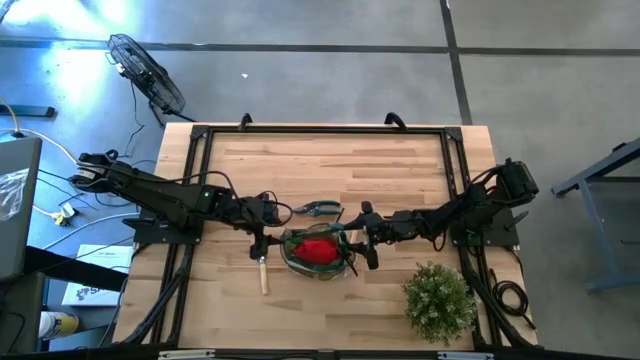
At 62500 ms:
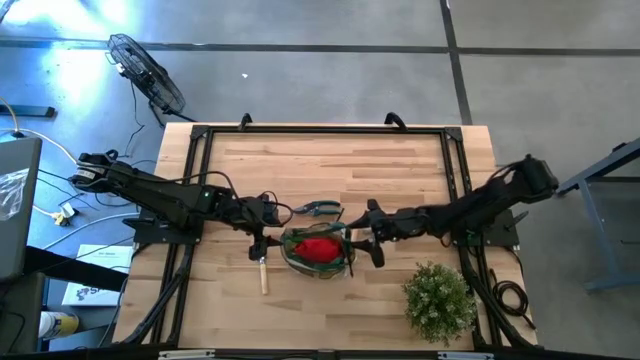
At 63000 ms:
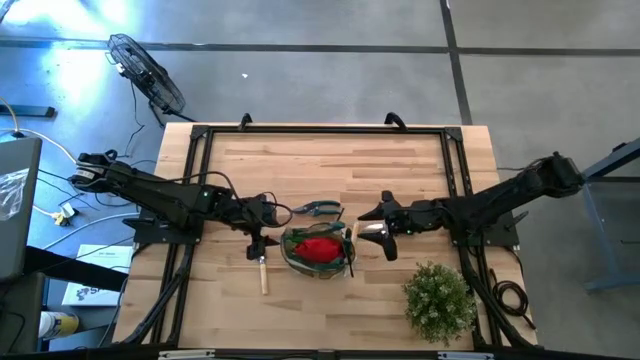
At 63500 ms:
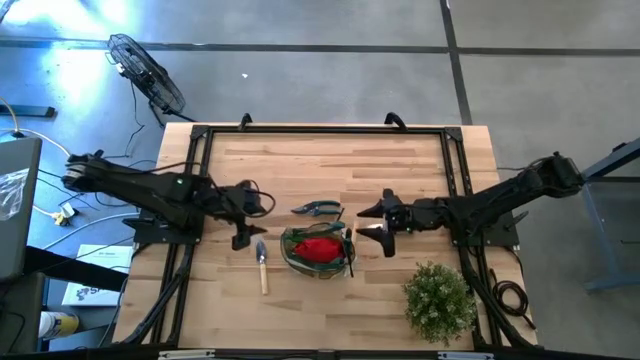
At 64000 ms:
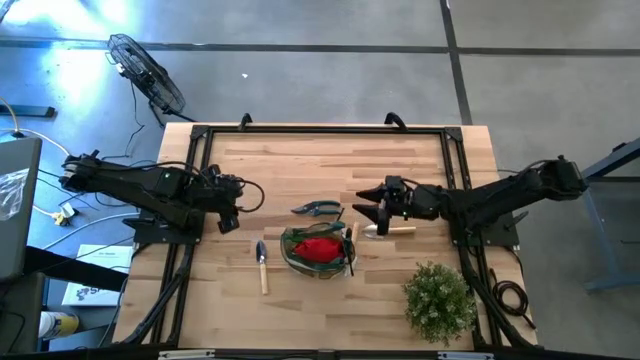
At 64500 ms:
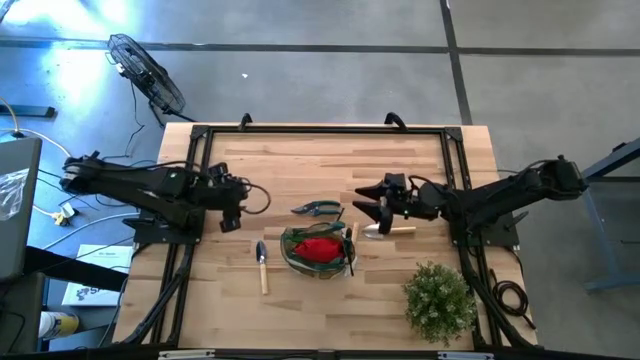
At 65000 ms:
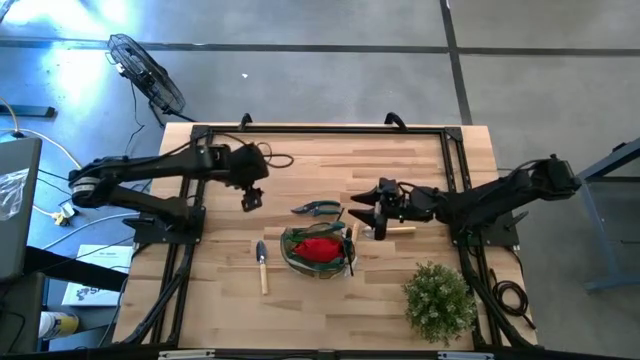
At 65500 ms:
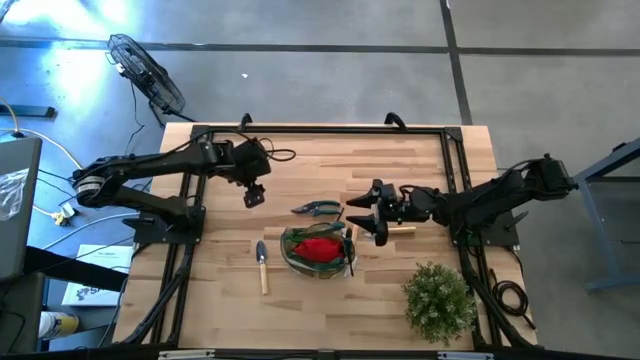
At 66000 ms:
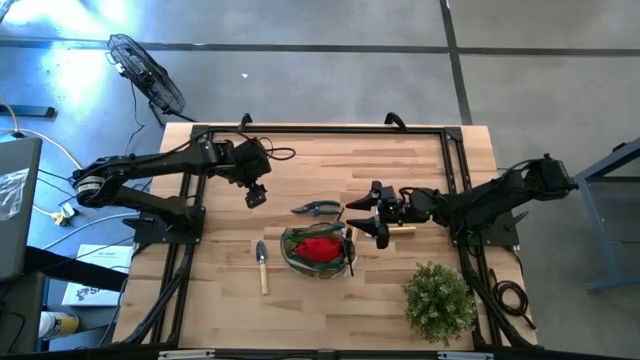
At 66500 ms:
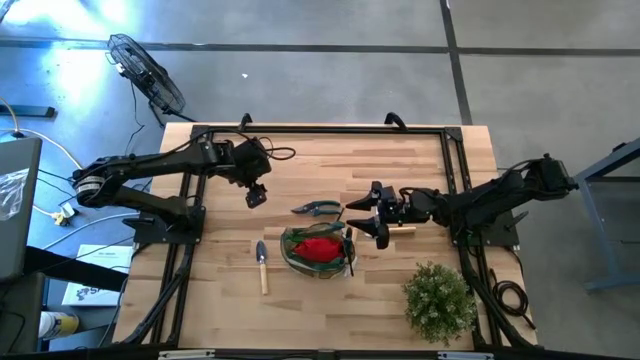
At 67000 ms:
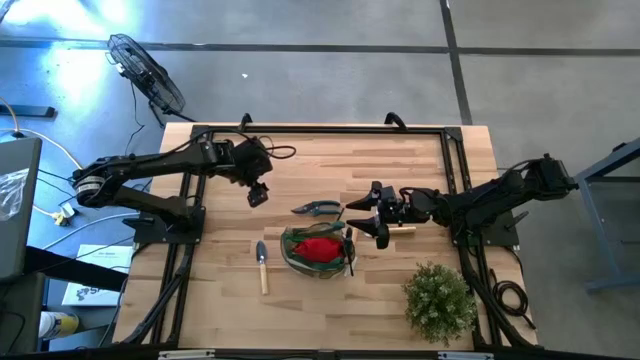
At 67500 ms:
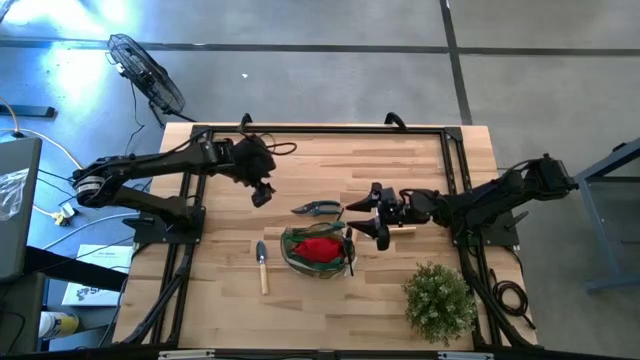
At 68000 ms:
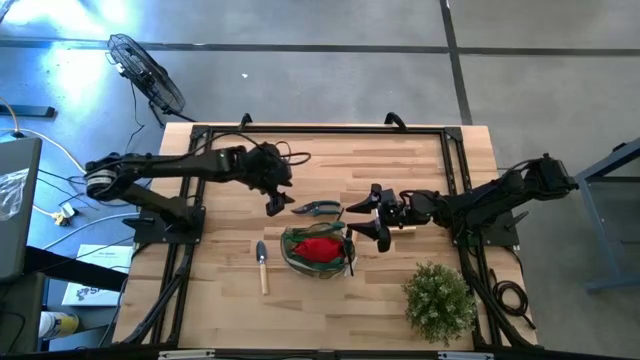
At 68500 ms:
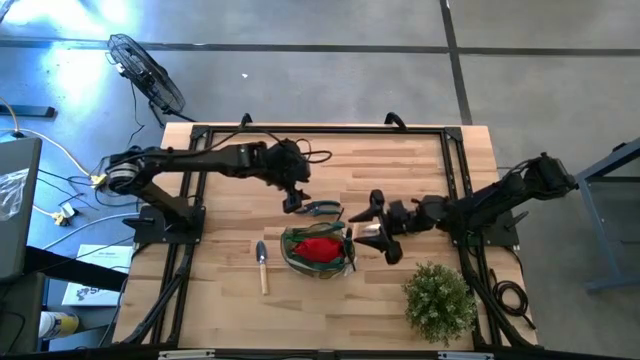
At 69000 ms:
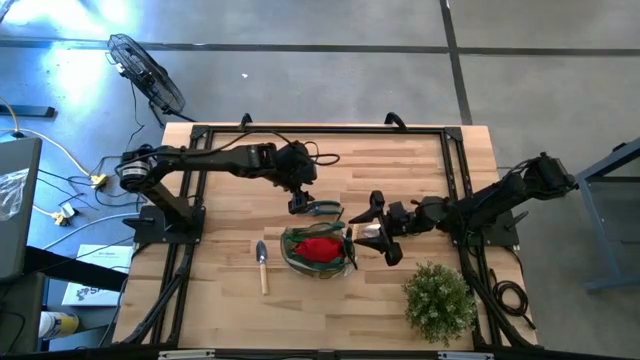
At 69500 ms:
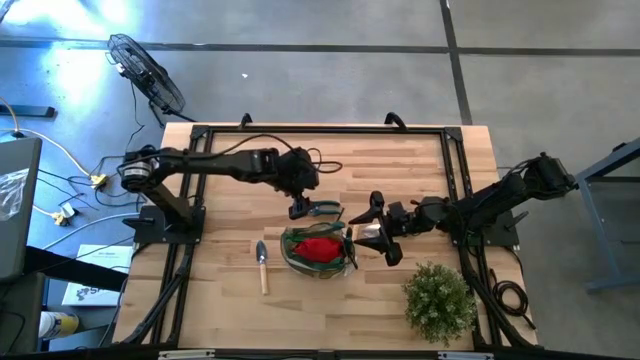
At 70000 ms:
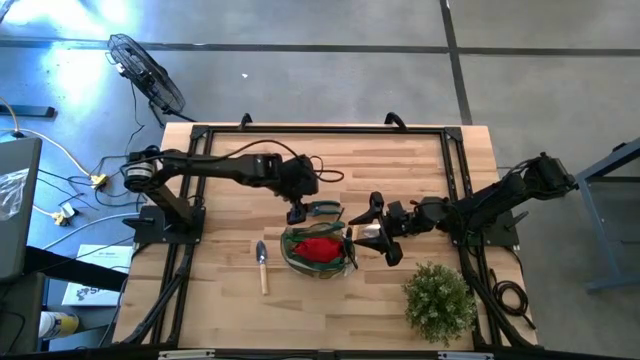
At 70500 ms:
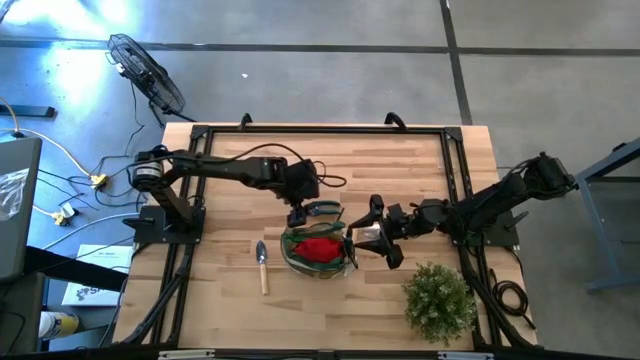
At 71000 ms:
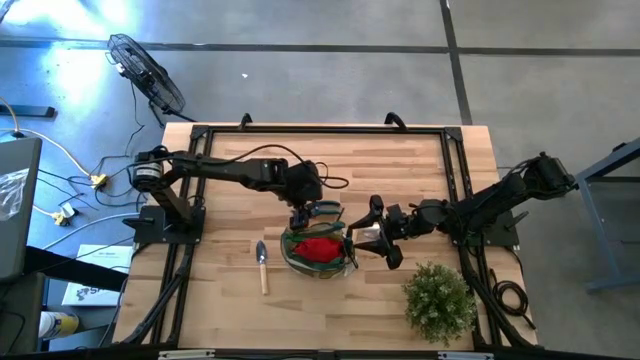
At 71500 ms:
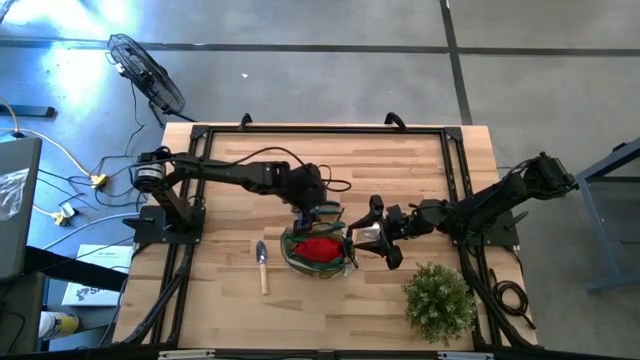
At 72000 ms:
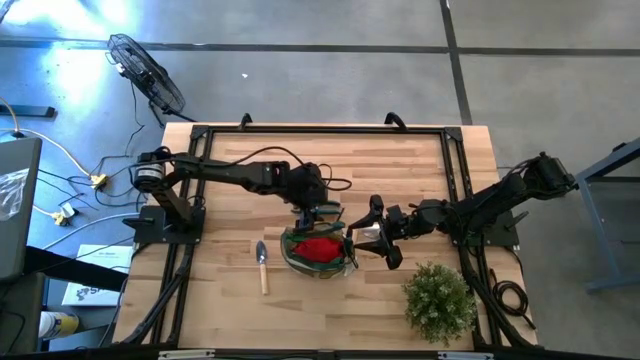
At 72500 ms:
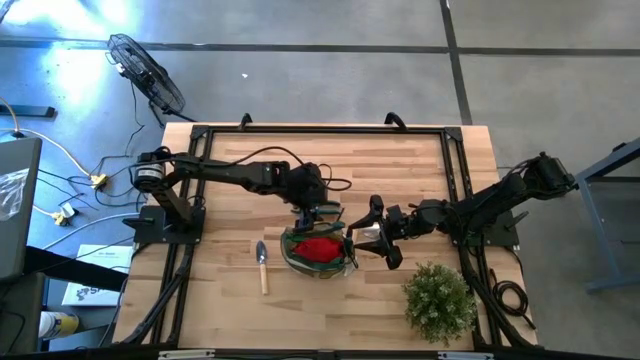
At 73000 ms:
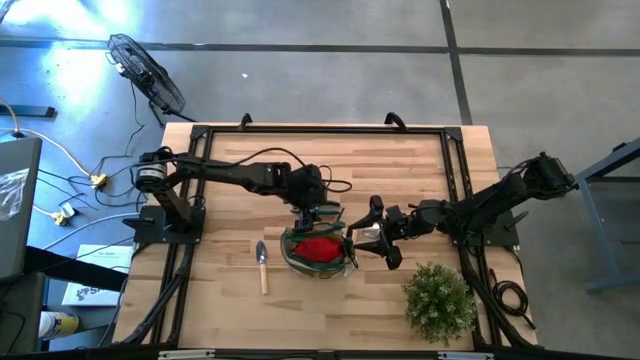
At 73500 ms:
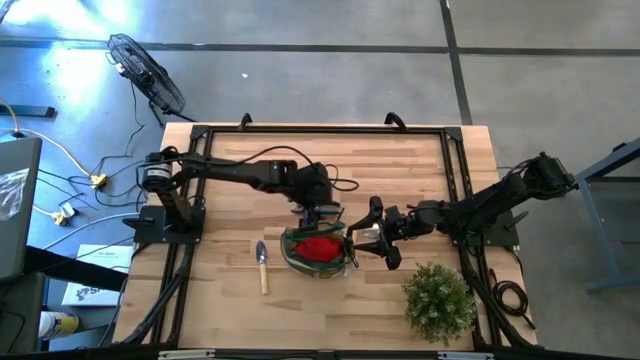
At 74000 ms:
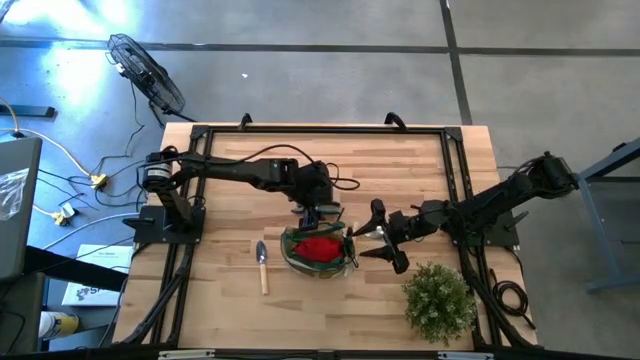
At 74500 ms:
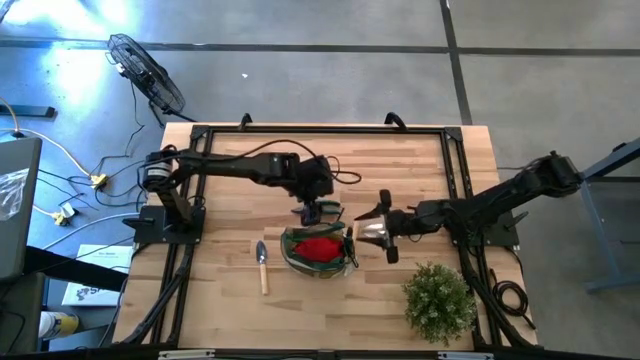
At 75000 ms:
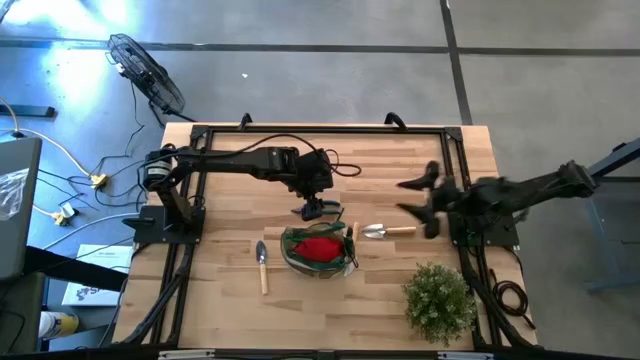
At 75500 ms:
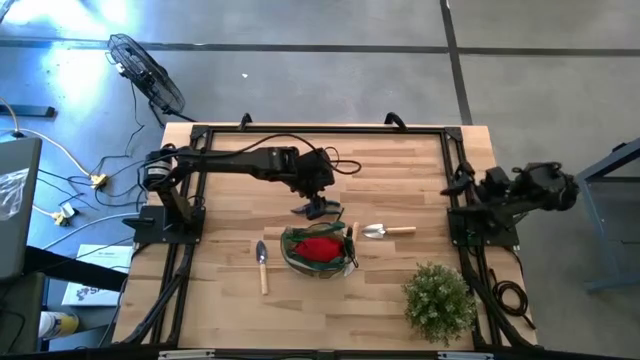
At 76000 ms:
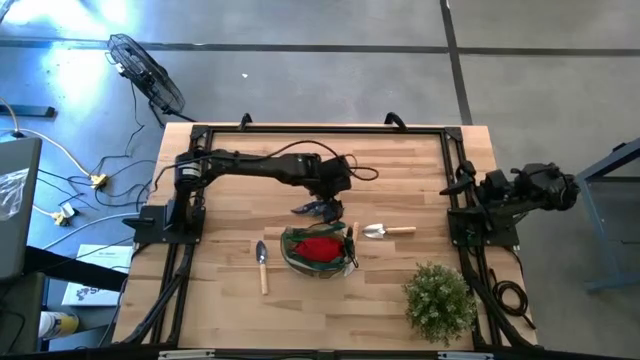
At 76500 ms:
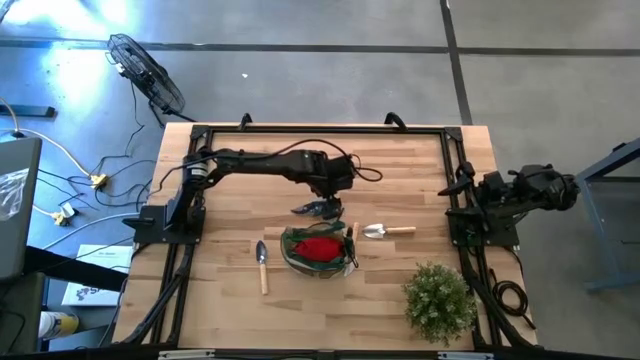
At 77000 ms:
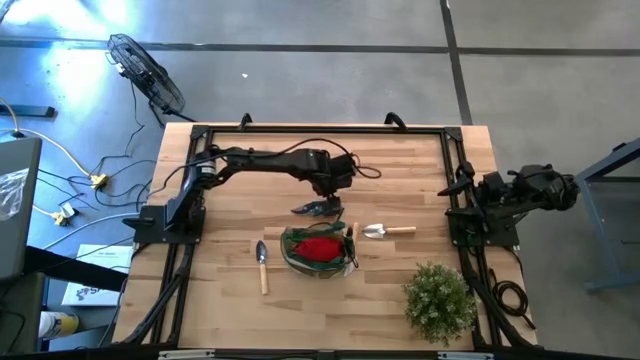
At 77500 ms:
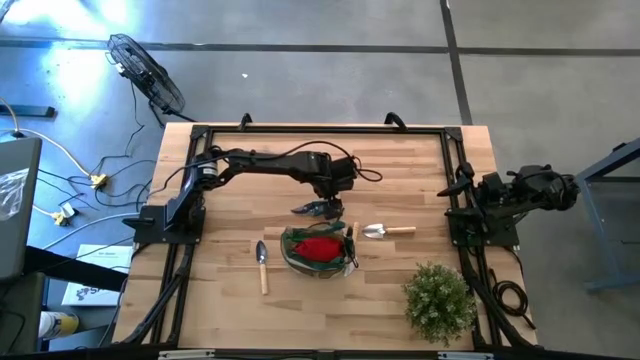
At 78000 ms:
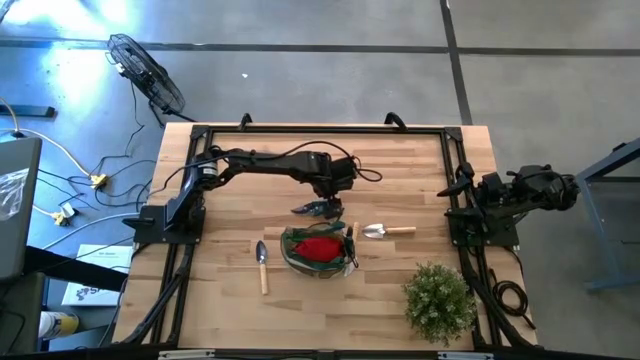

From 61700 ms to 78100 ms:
Task: Pick & Place Garden tools in Gardening bag
Put the green shear scissors into the green gardening bag

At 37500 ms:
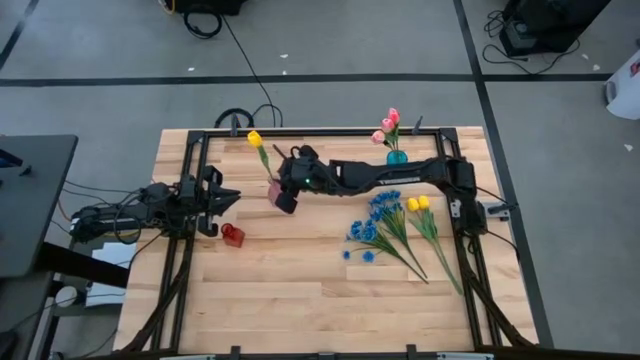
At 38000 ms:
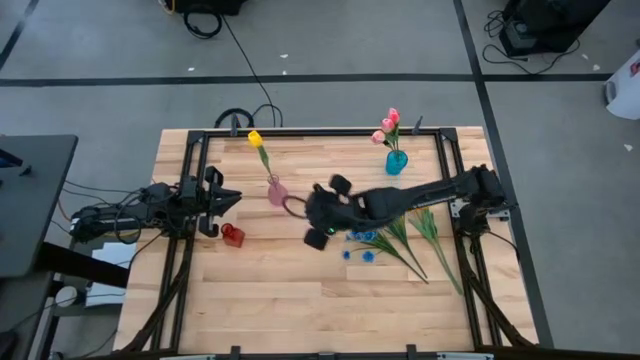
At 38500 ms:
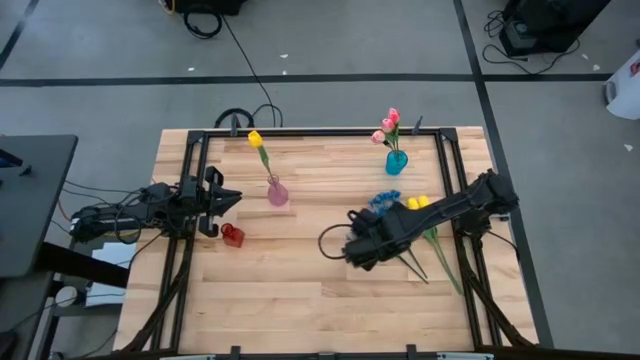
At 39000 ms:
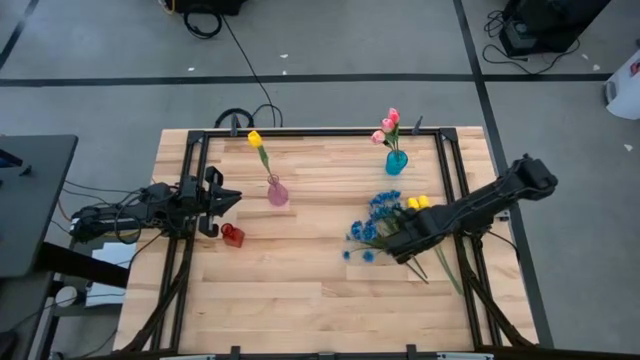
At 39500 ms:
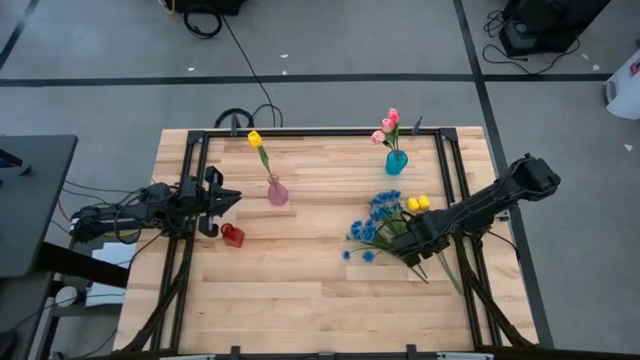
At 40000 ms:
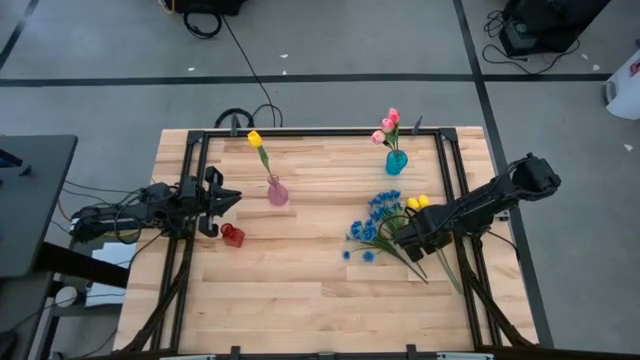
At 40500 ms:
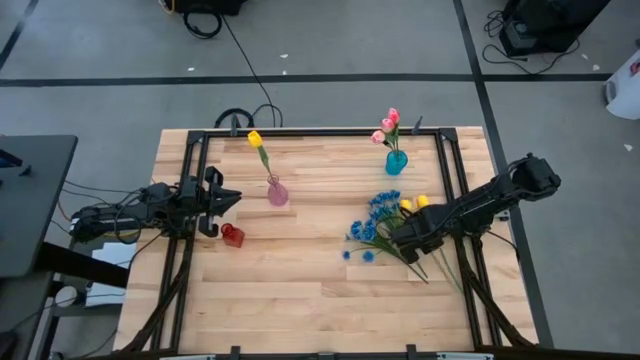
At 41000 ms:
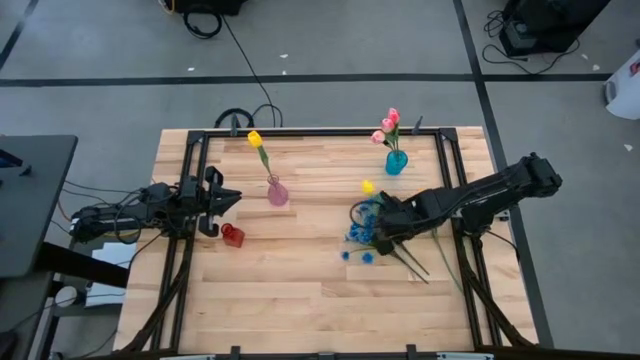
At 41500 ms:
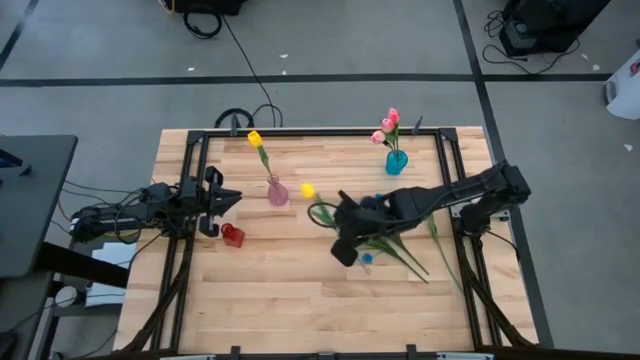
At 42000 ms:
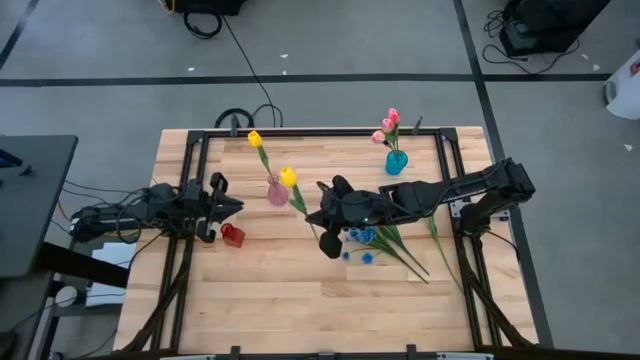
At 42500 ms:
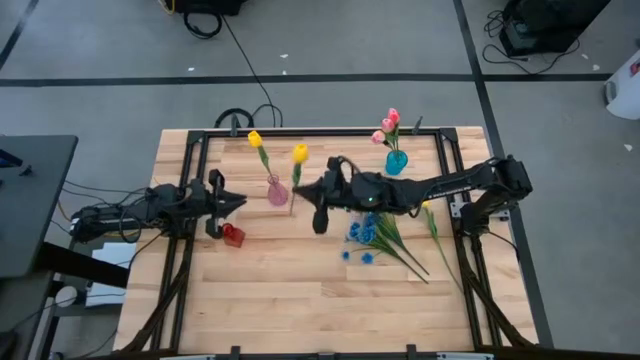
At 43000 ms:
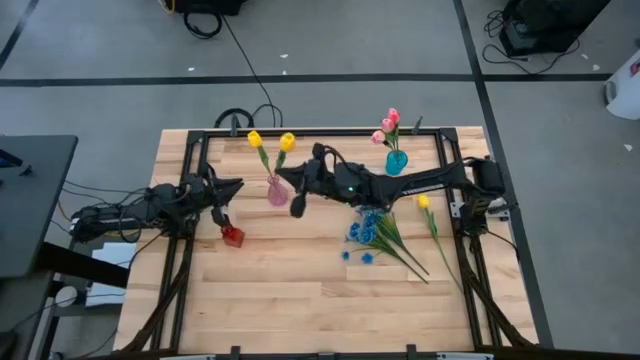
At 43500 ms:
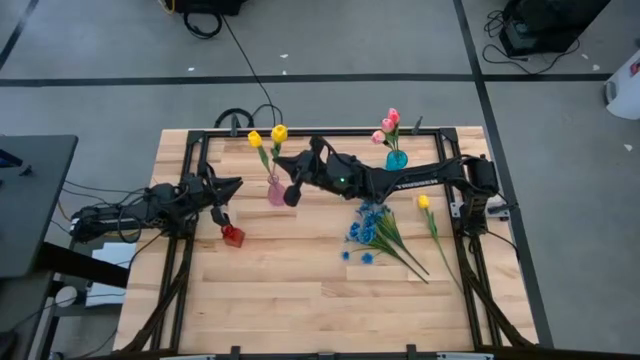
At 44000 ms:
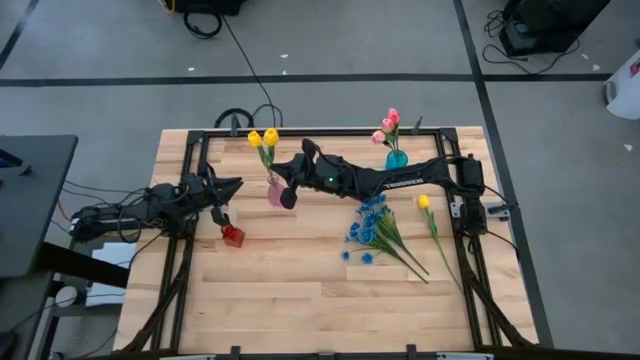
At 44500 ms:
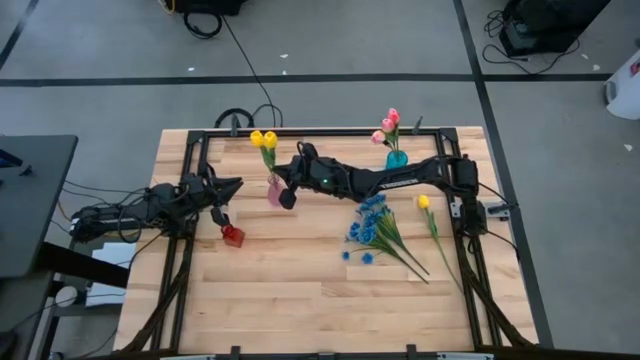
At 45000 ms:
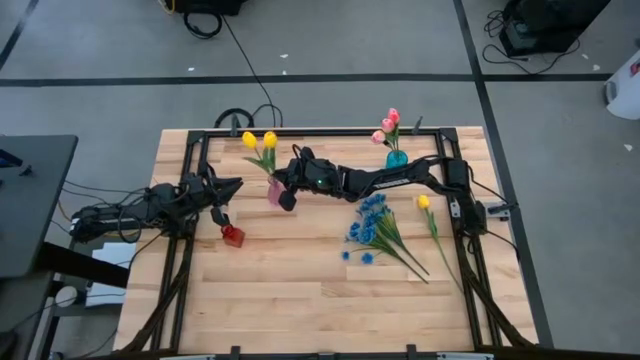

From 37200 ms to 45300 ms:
Task: Sort flowers into vase by color
Put the left yellow flower into the pink vase
